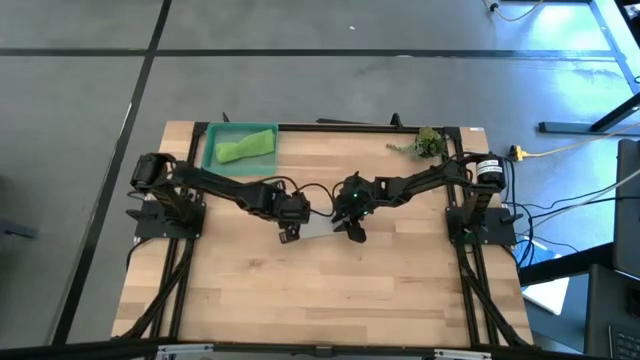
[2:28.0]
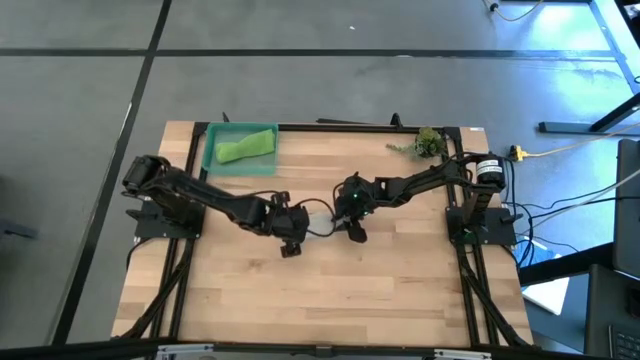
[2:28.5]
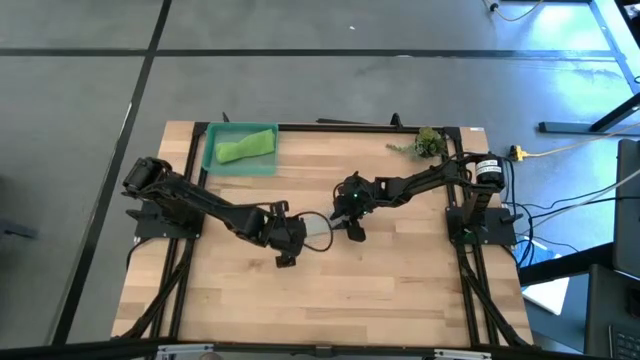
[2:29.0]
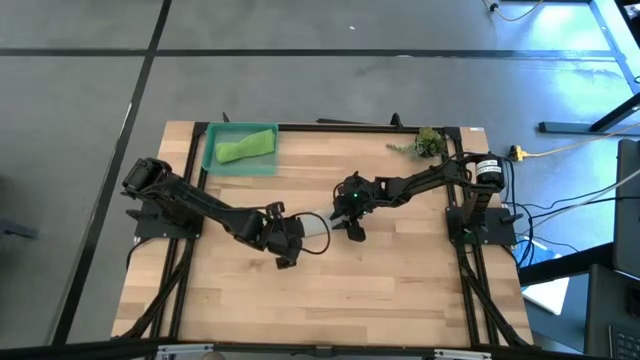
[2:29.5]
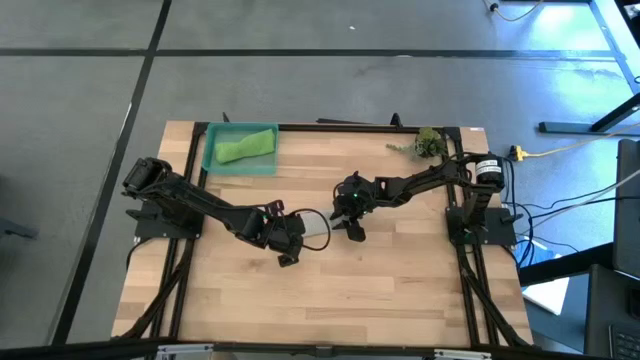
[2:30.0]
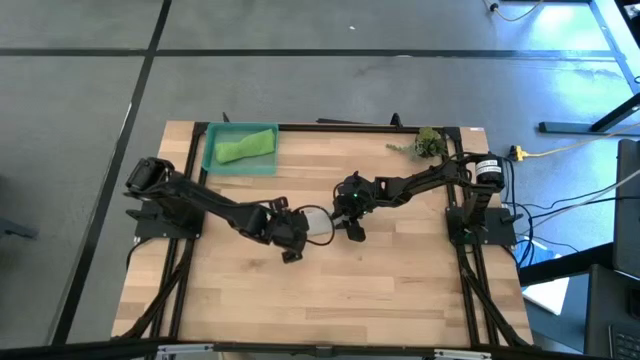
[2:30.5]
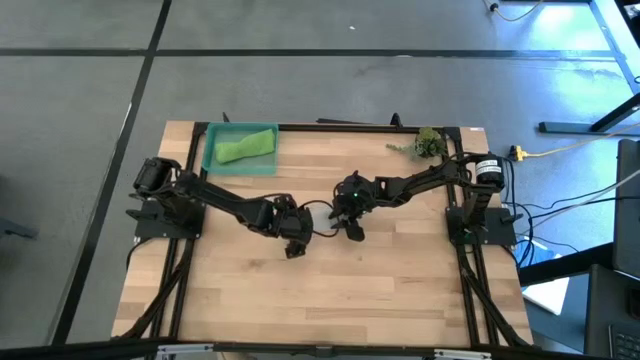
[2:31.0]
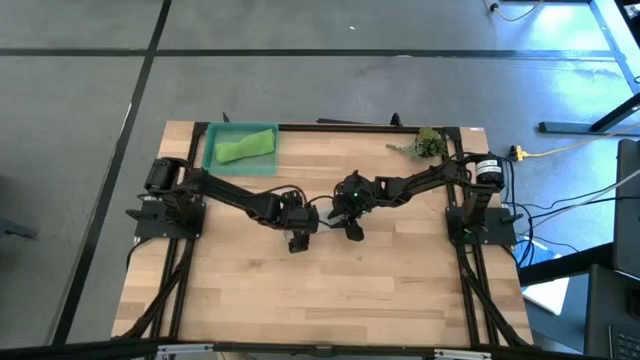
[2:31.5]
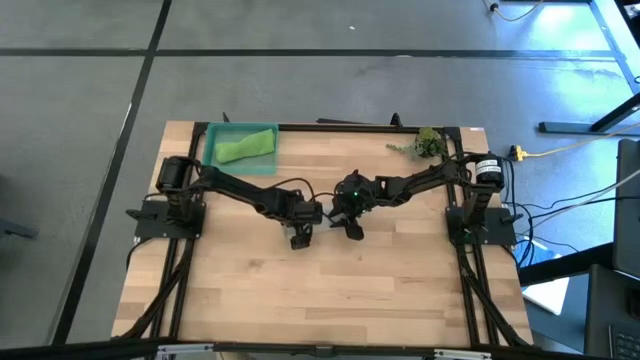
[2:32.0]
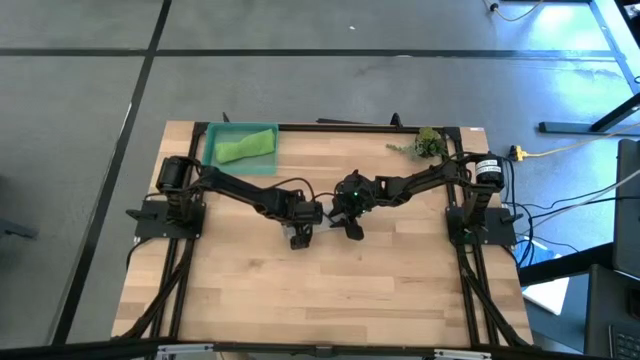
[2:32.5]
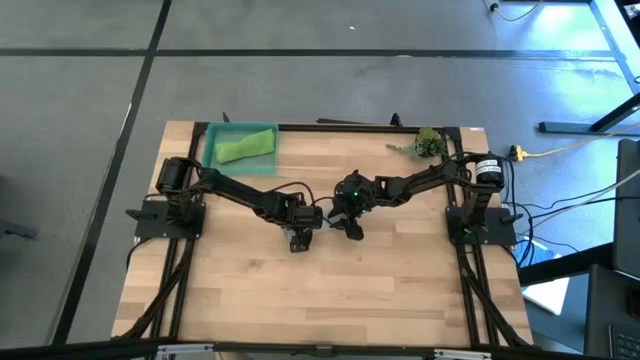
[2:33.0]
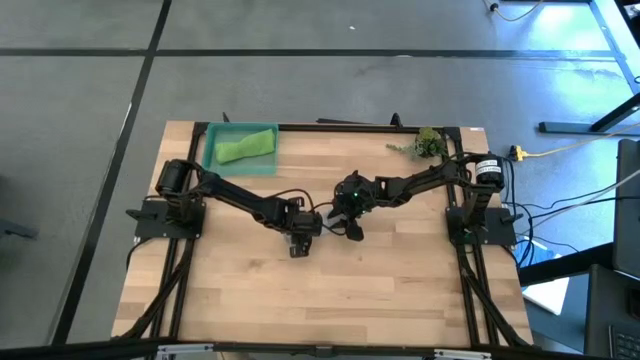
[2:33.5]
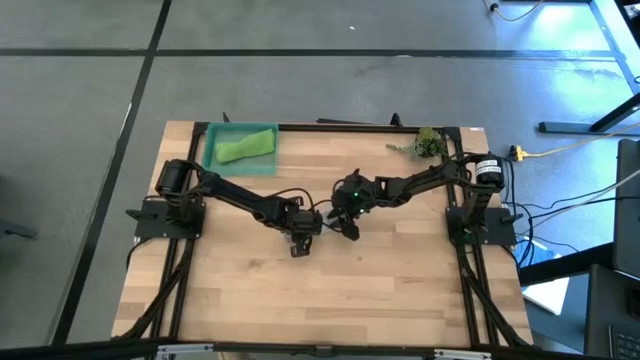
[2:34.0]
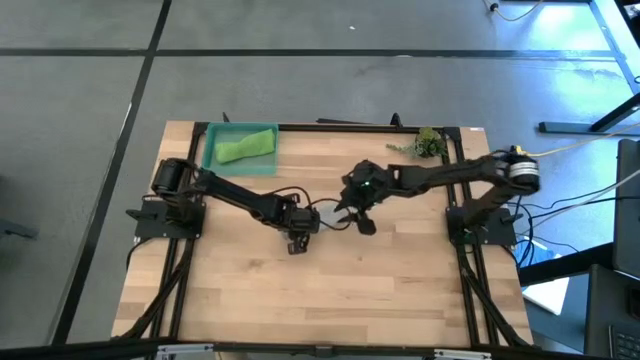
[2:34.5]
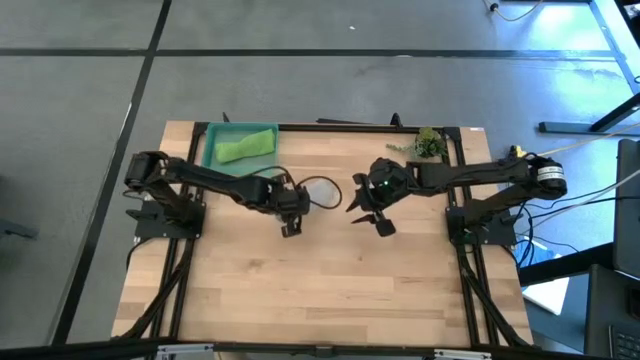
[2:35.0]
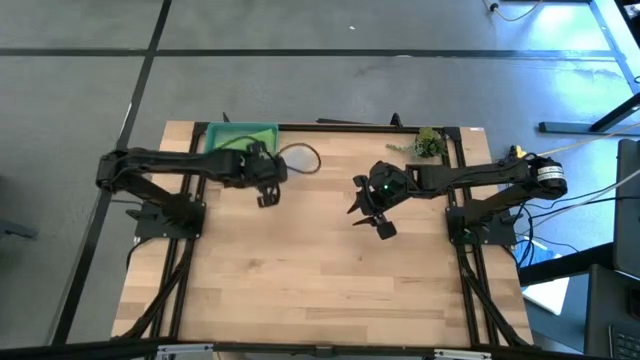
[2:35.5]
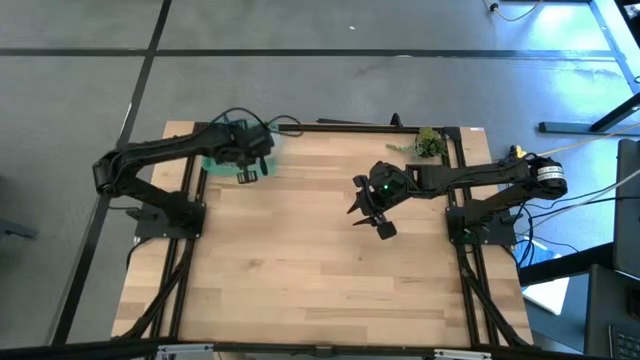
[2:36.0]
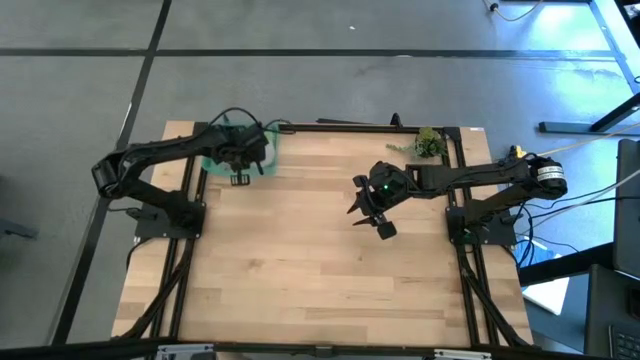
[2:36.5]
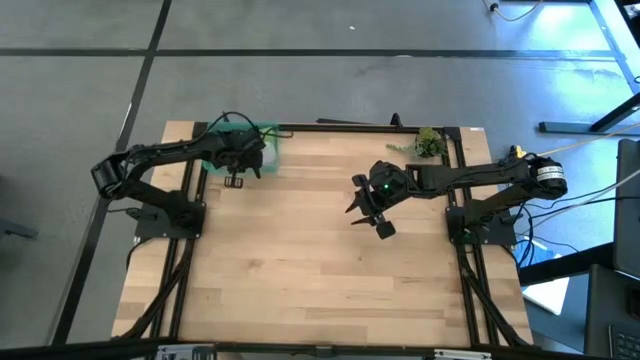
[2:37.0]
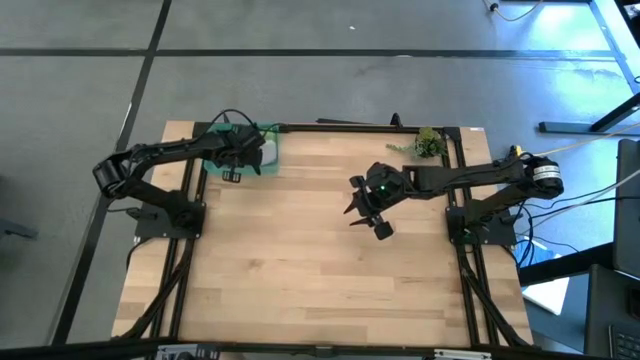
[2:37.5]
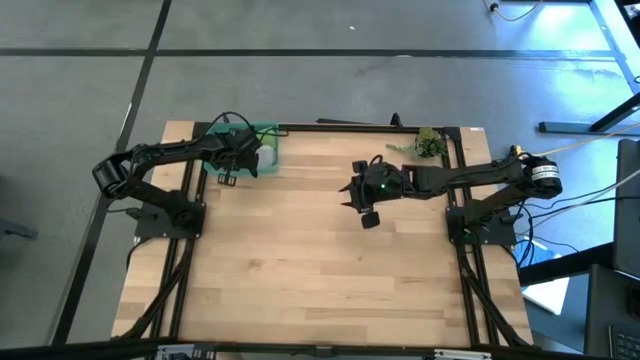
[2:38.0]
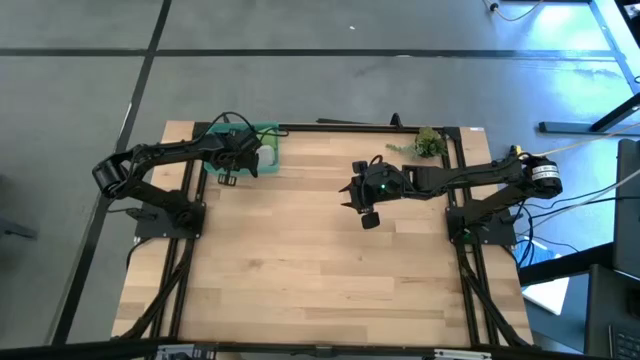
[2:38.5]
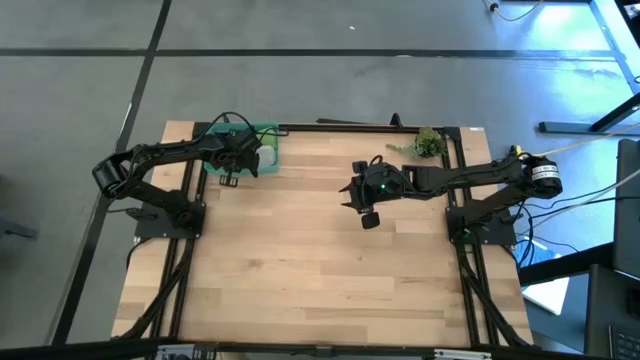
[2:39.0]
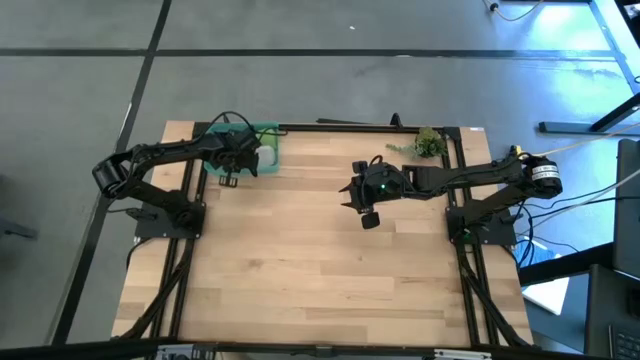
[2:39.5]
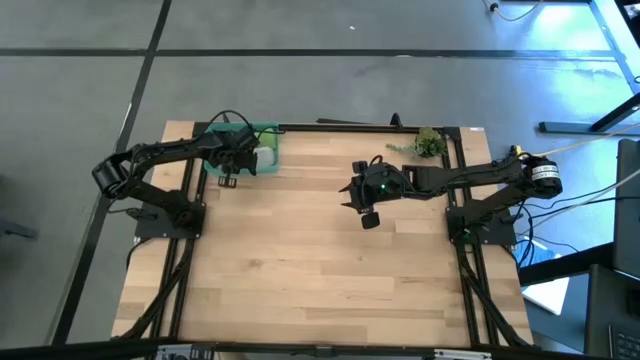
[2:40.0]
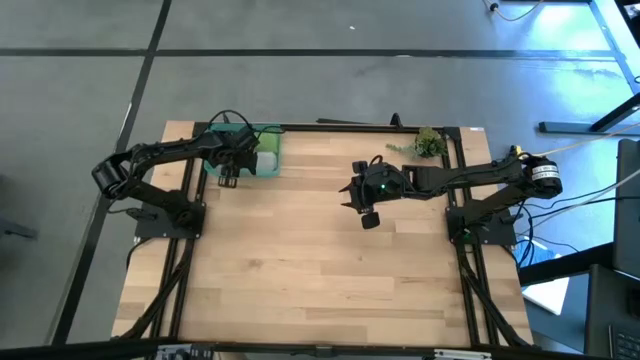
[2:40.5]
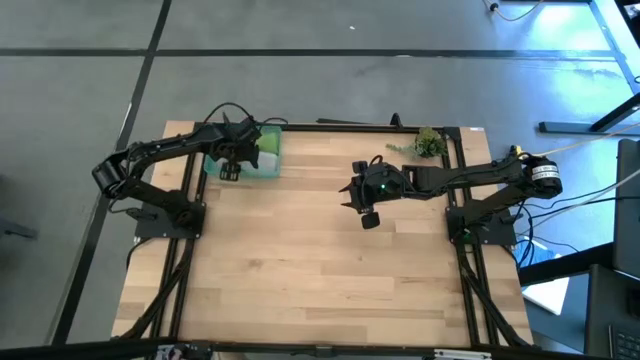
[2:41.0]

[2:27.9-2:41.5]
Task: Roll microfiber towels into tight, uniform cylinder then place into a basket
Put the rolled gray towel into the light blue bin

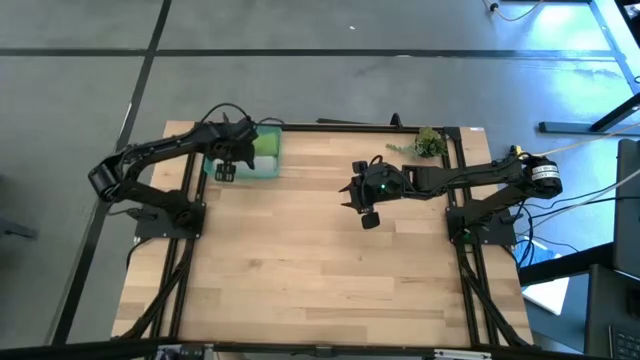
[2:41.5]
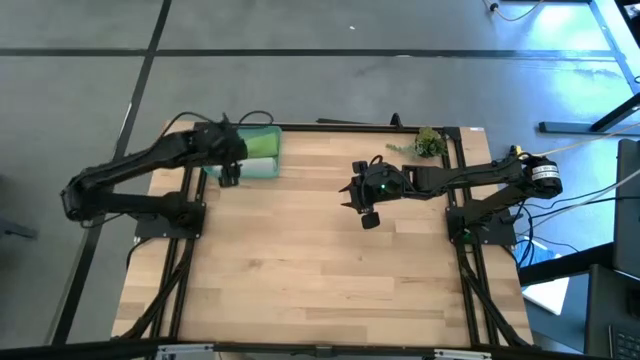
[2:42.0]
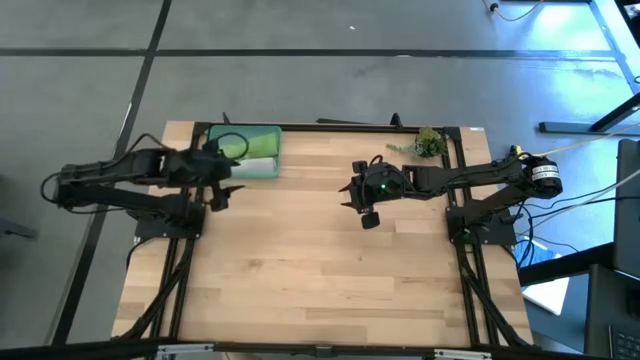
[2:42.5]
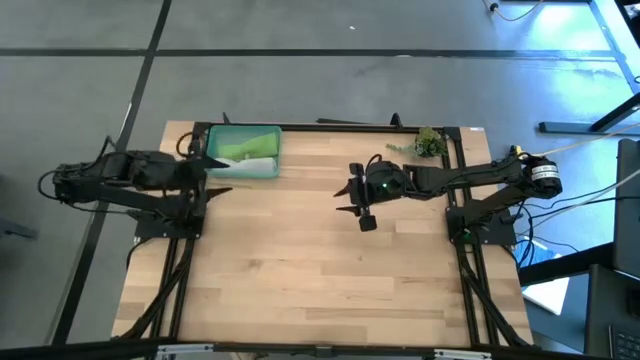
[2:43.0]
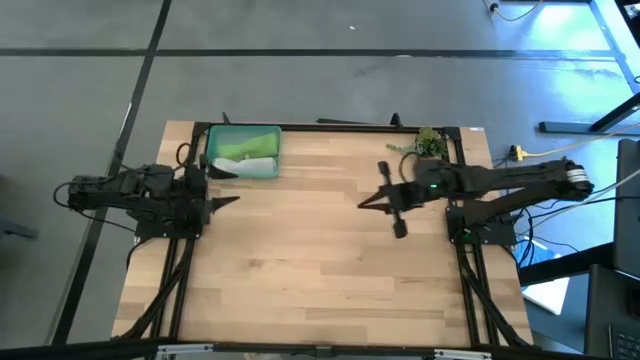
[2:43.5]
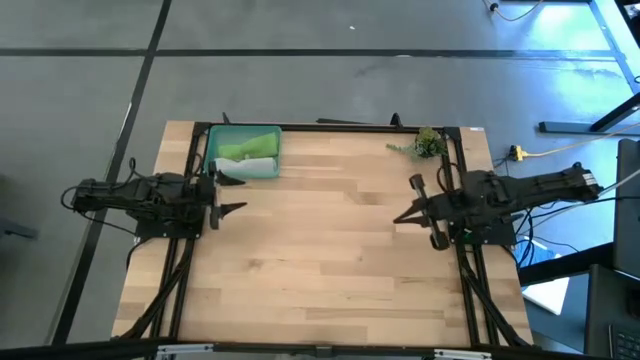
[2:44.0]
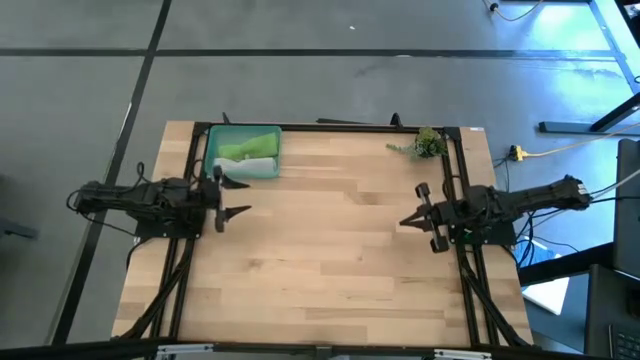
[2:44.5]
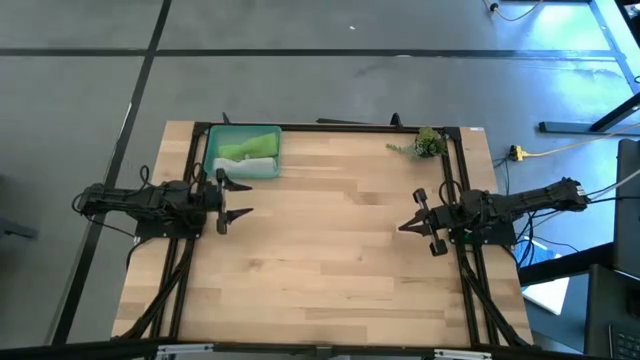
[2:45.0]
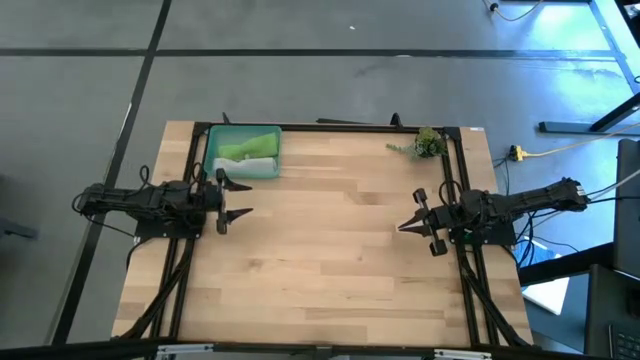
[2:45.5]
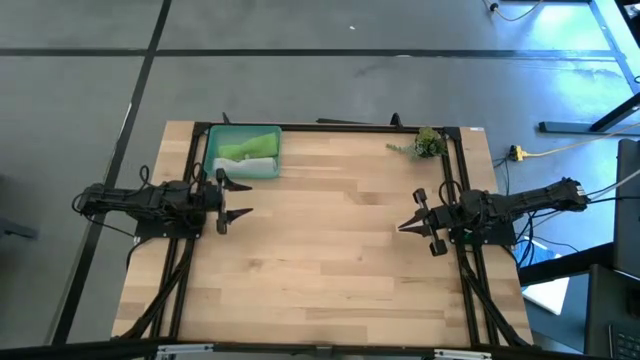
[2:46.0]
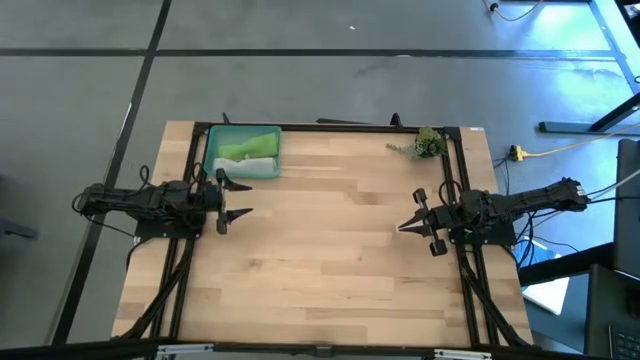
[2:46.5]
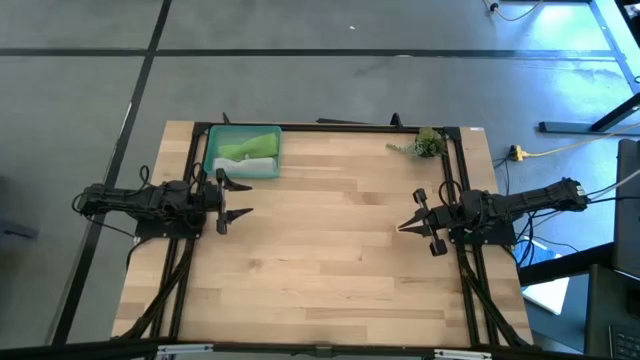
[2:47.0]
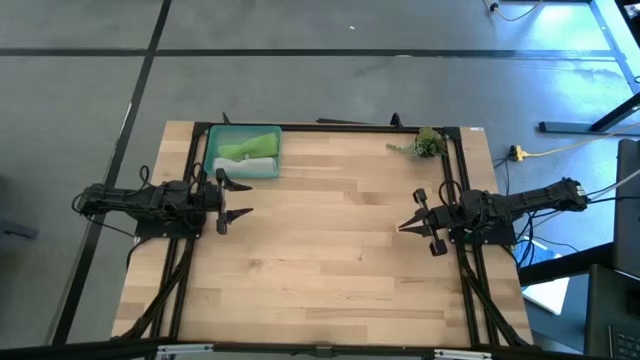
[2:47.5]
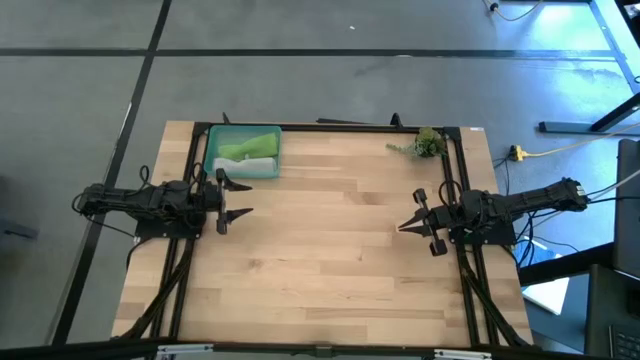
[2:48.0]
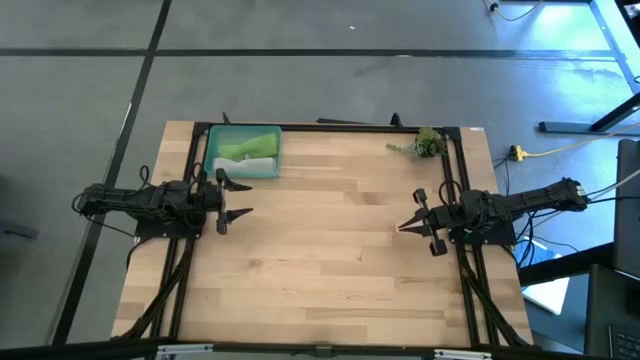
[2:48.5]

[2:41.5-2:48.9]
Return to Home Position
